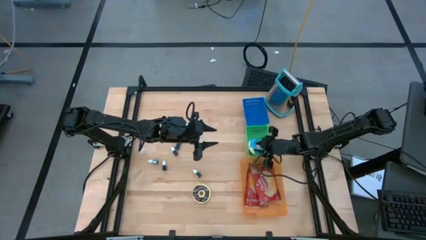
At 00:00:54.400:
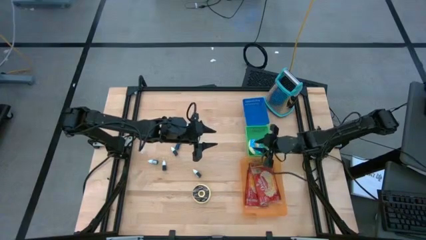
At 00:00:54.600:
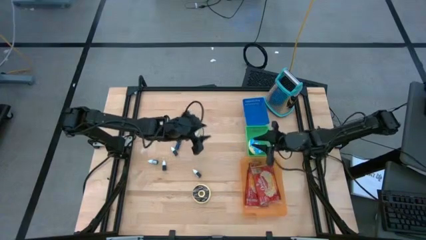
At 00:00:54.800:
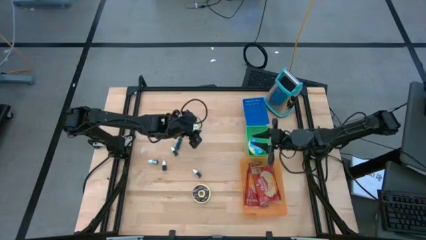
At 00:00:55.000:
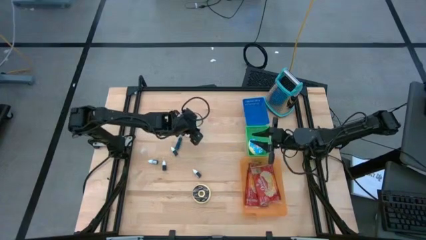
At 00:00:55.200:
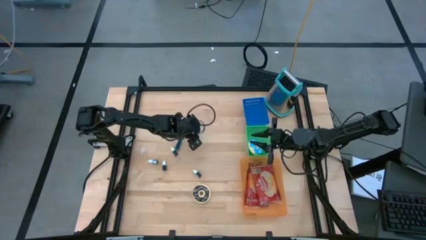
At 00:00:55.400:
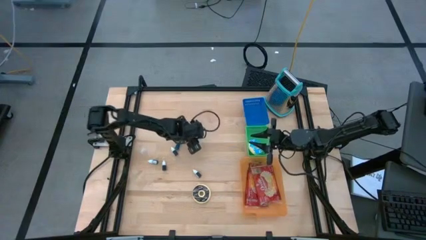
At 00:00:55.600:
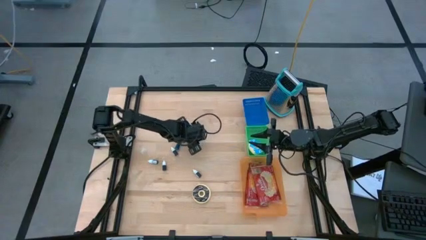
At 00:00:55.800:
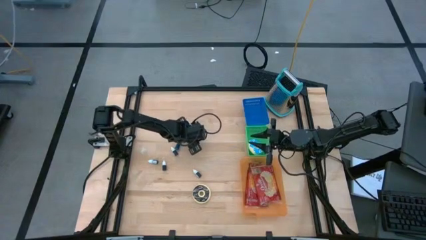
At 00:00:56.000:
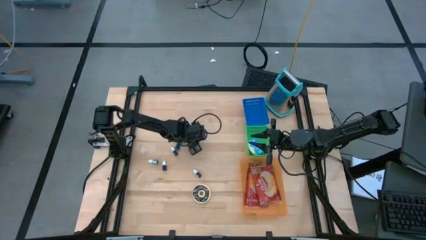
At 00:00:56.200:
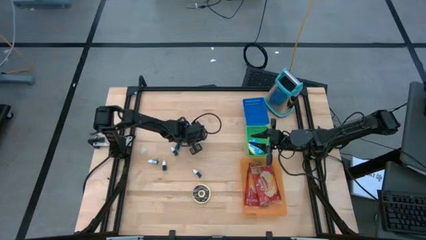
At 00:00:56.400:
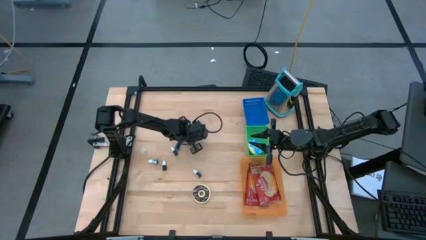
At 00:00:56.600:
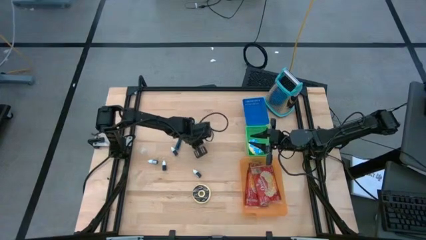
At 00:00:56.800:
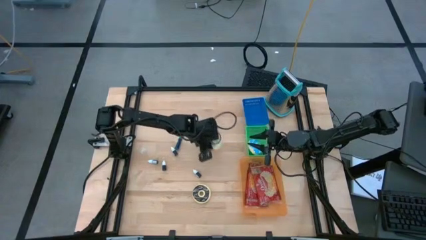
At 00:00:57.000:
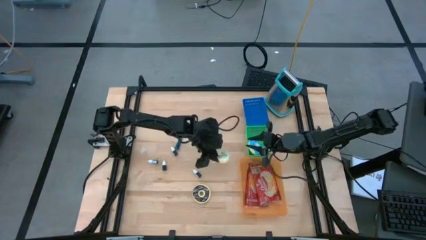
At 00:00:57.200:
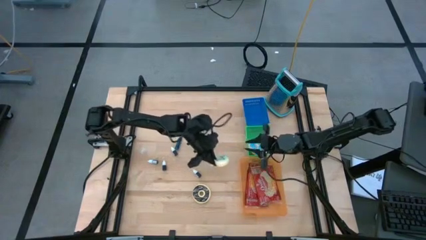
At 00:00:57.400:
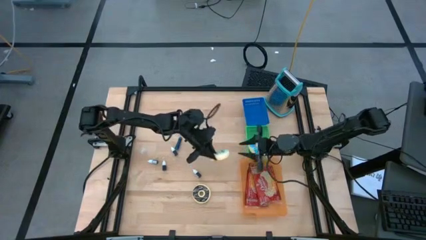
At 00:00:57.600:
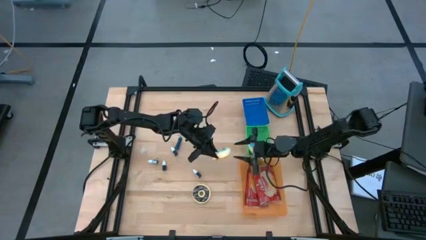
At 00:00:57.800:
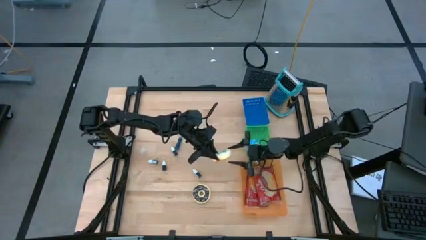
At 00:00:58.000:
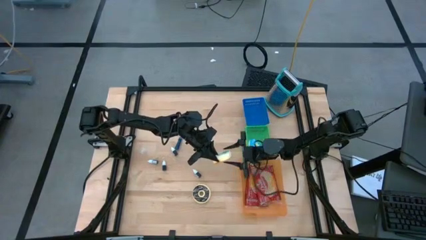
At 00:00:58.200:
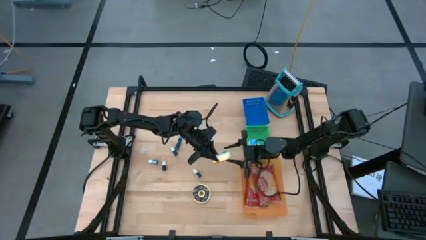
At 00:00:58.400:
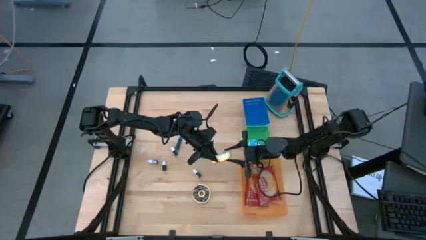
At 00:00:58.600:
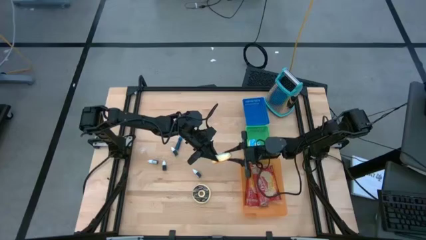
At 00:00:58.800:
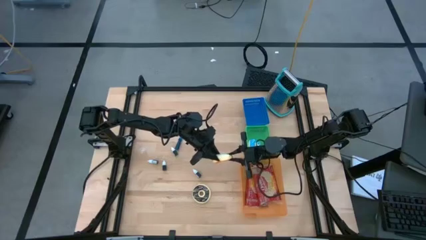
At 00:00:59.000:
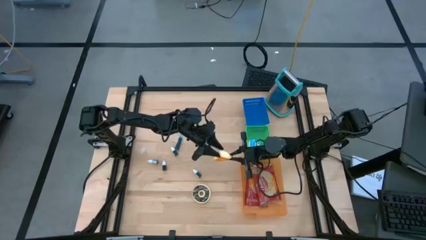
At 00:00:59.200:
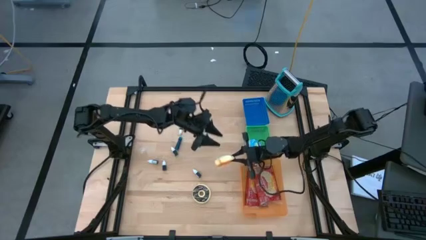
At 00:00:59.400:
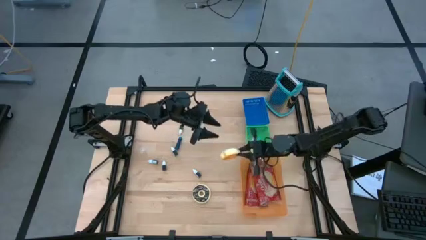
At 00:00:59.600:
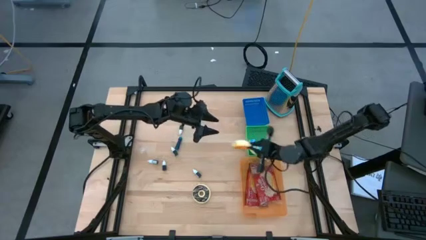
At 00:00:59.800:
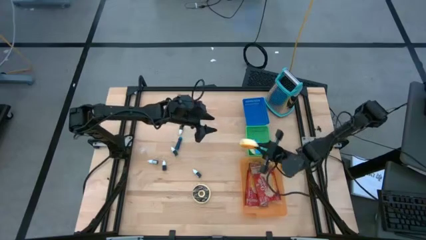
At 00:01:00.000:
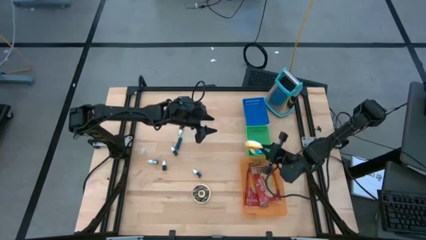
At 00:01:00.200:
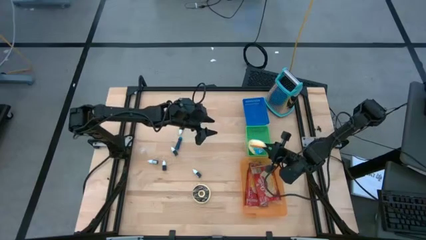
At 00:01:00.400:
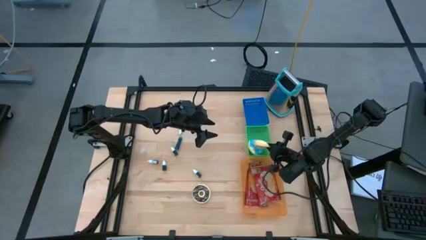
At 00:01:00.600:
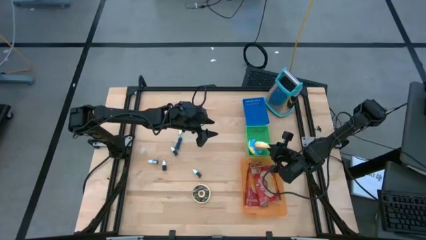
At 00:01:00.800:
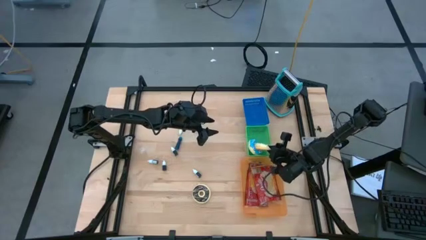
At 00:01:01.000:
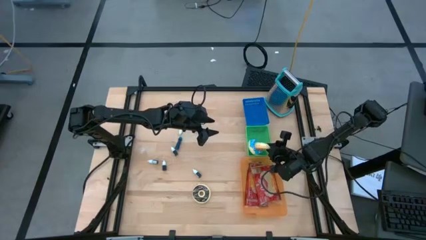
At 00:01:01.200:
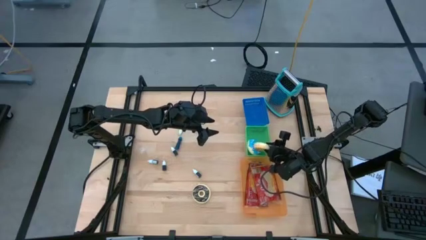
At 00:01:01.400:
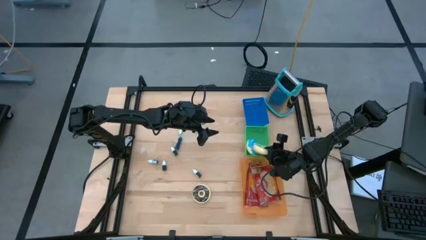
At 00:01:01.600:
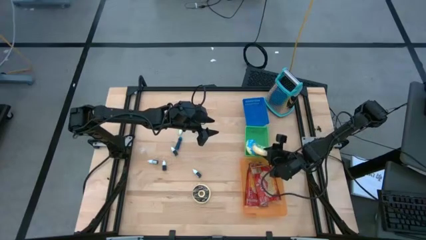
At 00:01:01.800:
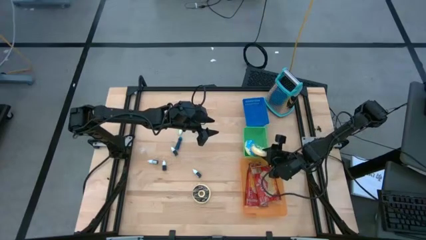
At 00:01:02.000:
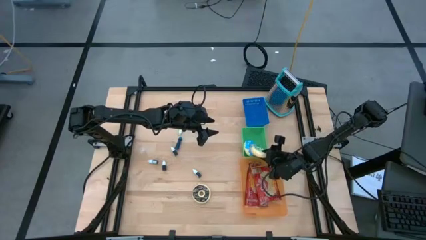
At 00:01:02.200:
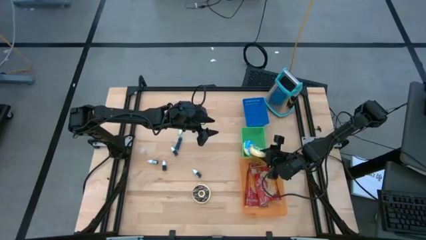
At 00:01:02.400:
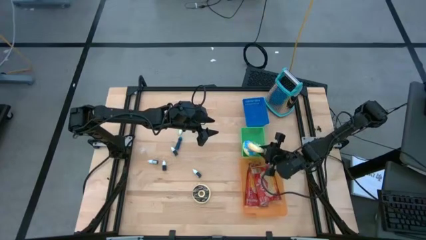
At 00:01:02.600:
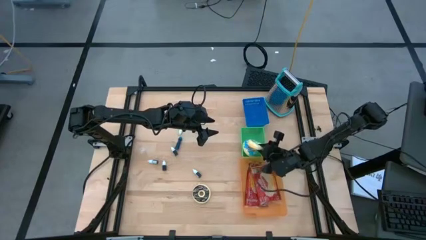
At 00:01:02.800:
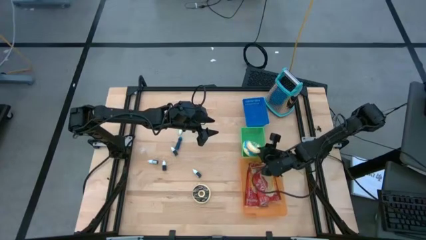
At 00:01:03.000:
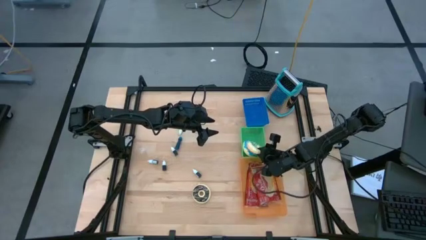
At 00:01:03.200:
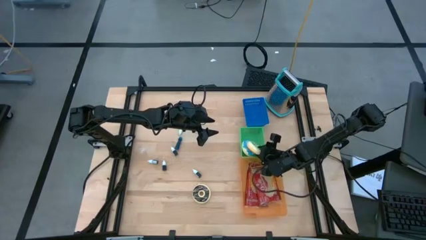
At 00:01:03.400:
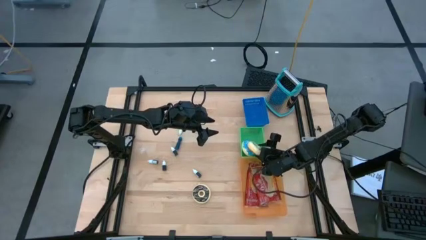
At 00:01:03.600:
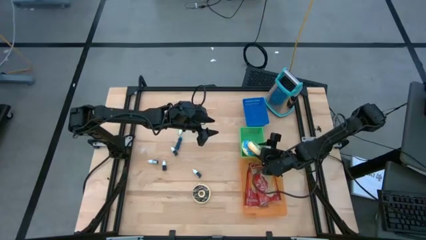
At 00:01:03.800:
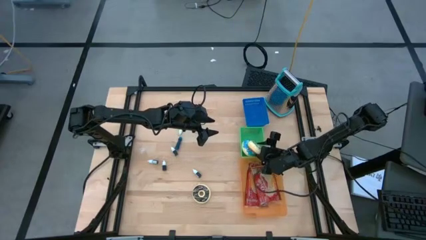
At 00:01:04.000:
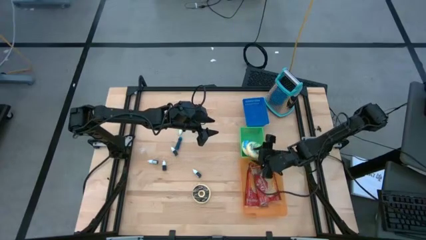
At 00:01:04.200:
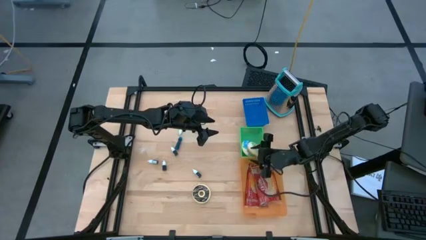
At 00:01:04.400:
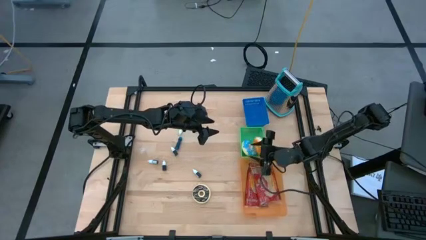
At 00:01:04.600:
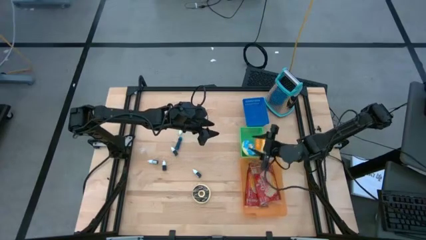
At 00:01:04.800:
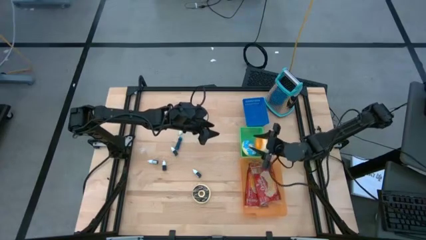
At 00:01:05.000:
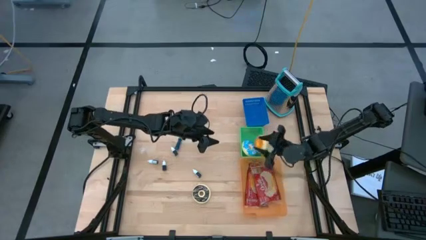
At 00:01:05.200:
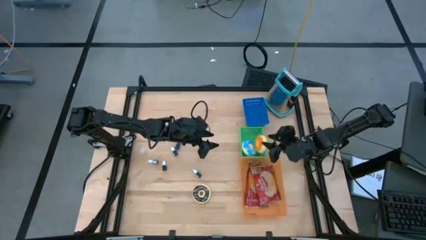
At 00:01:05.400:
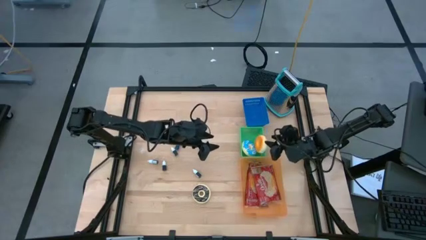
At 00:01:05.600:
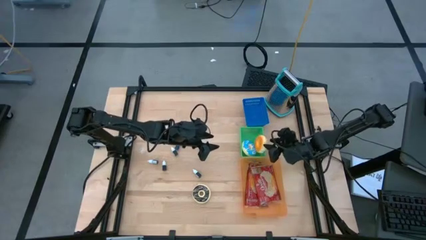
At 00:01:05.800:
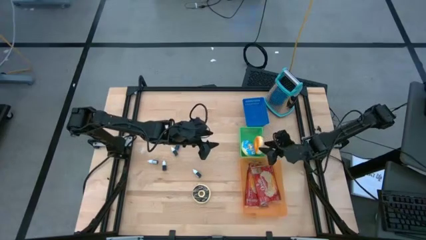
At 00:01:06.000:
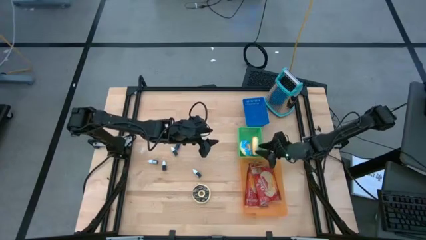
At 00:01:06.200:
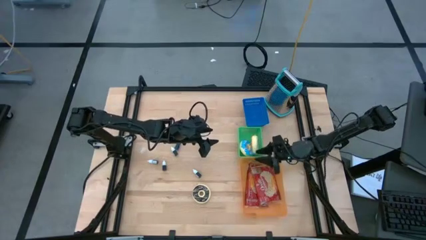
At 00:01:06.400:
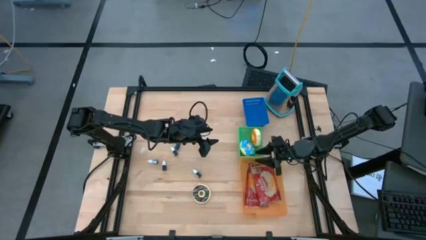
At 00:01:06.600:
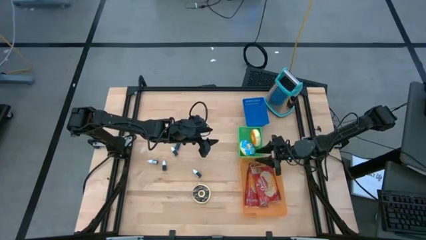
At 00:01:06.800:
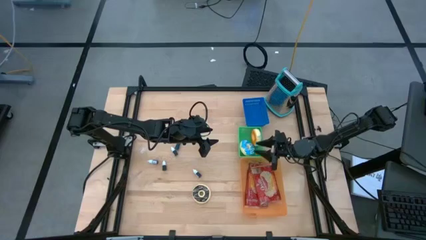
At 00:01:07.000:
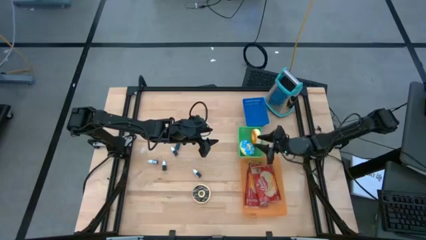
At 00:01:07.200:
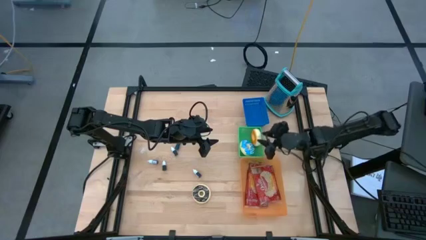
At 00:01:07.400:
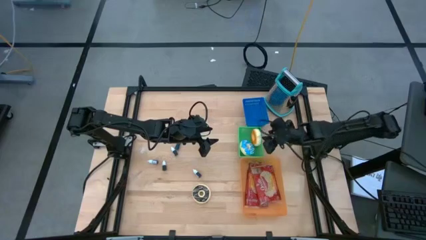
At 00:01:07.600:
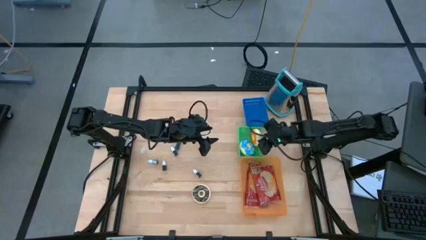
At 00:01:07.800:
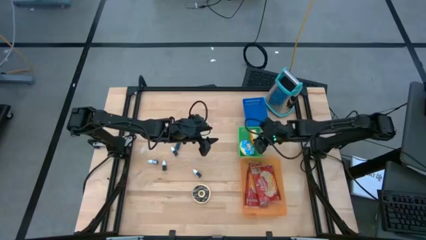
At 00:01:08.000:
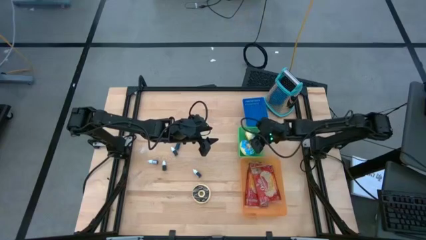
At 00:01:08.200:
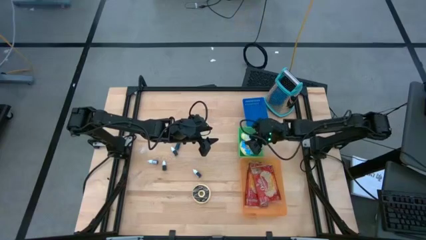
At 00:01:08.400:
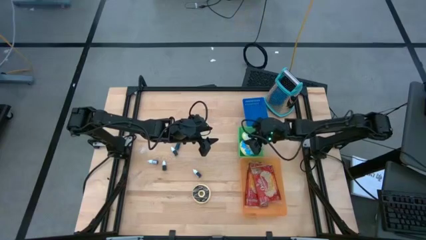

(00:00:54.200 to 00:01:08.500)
Put the light blue donut into the green bin
